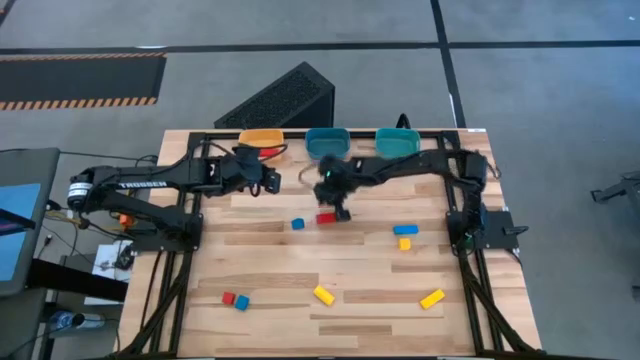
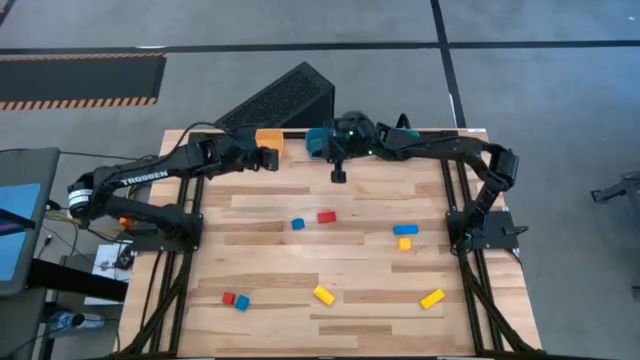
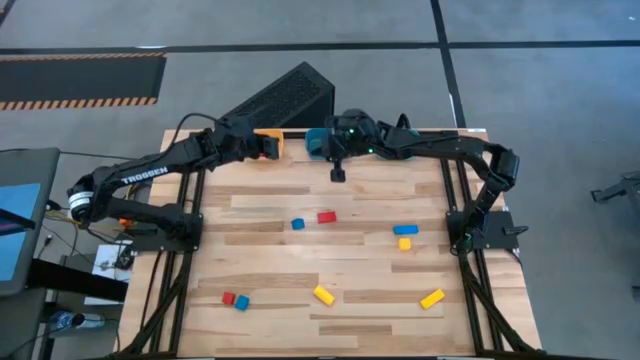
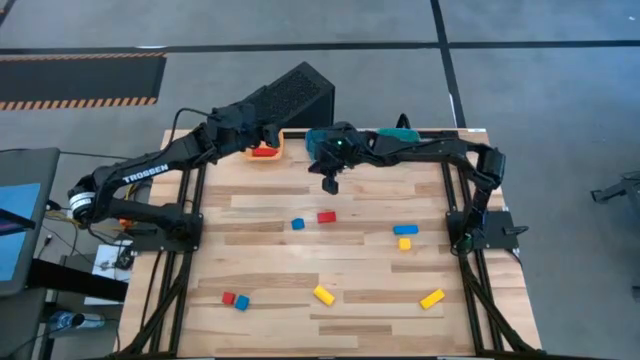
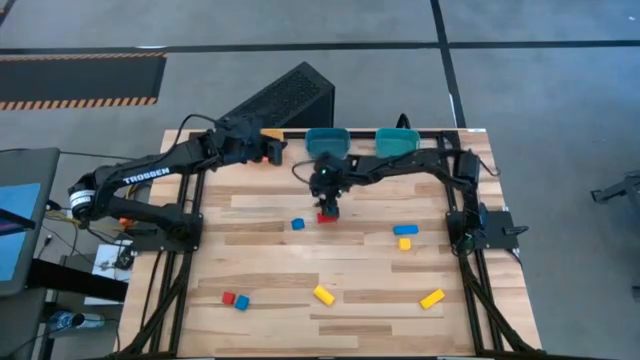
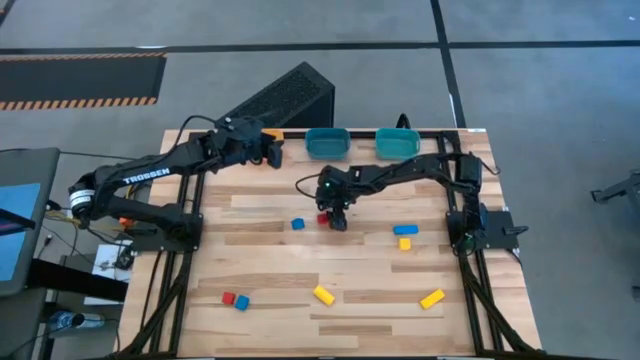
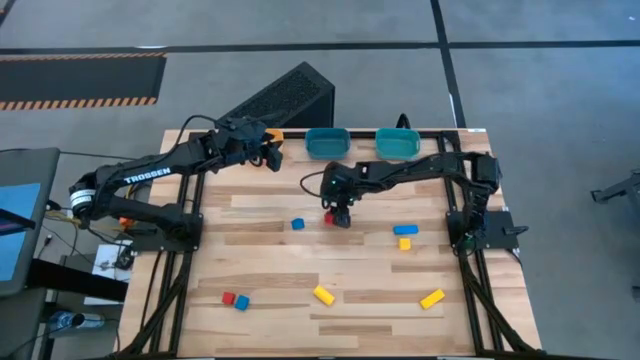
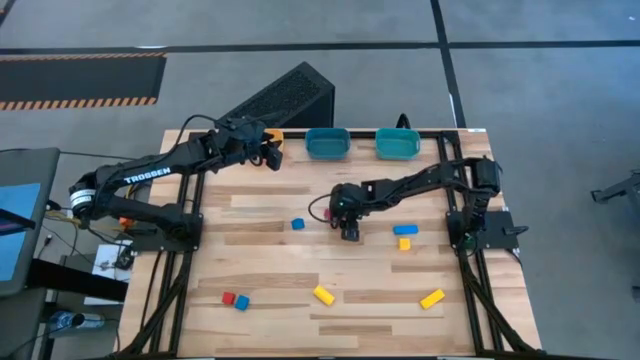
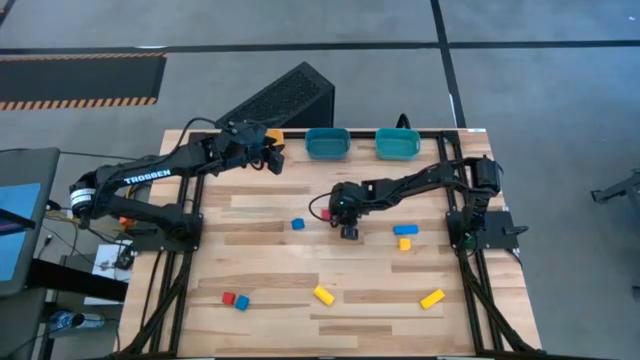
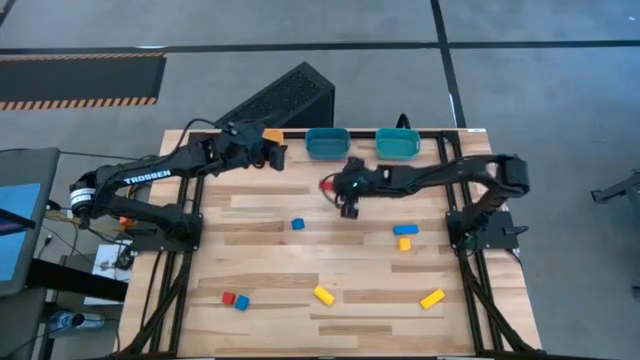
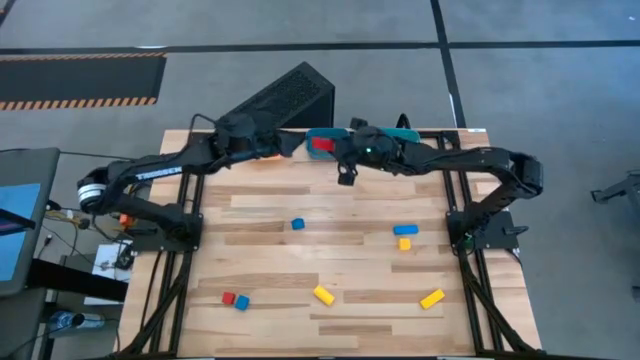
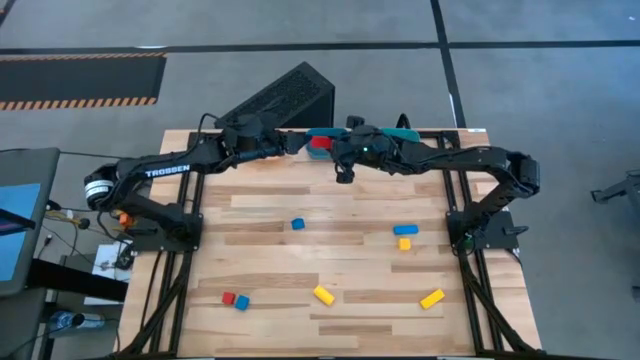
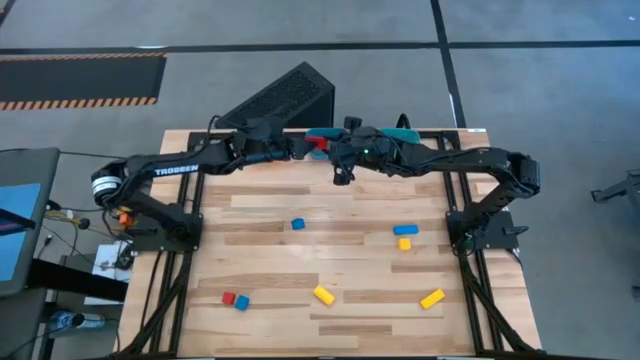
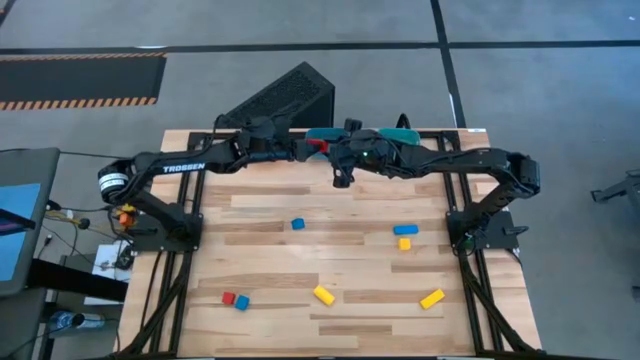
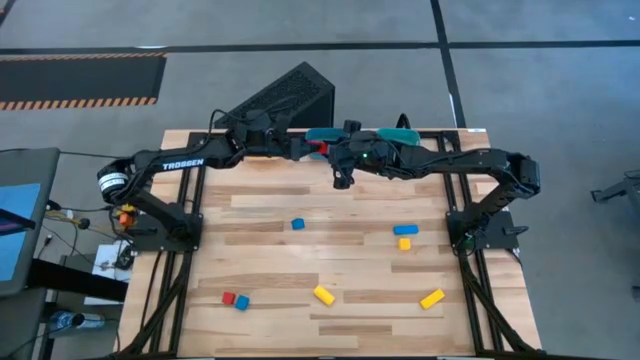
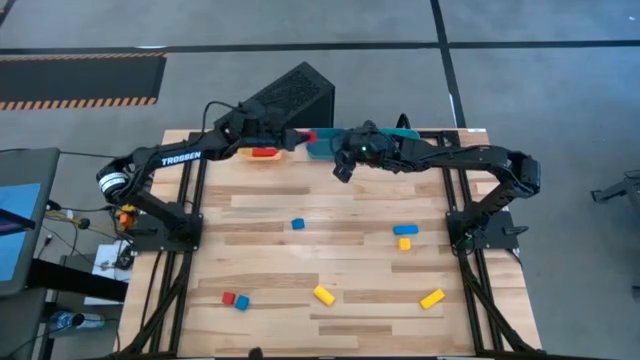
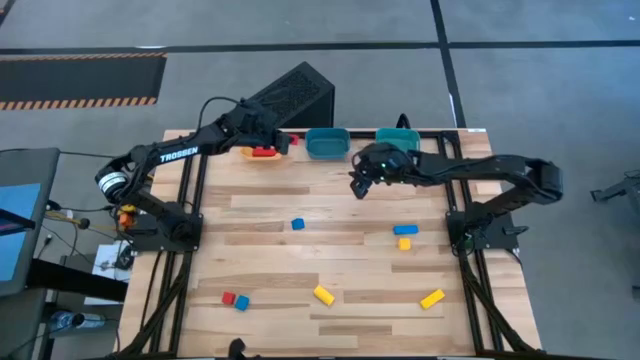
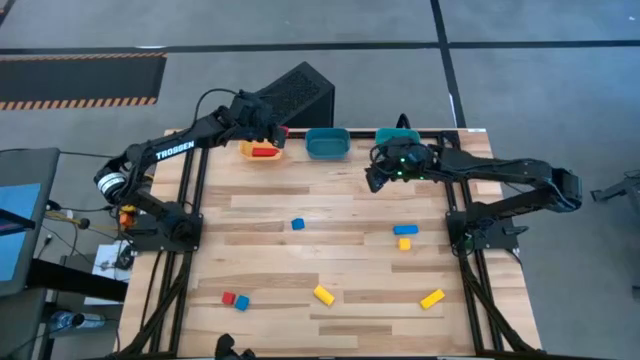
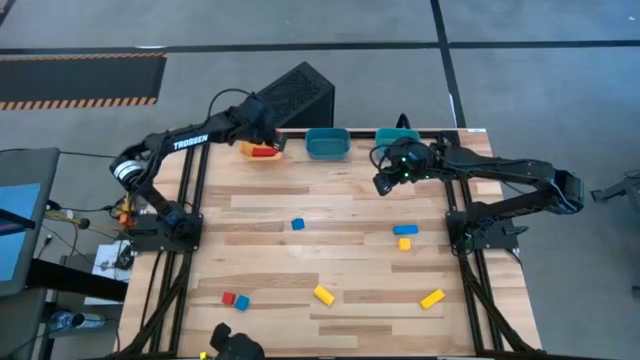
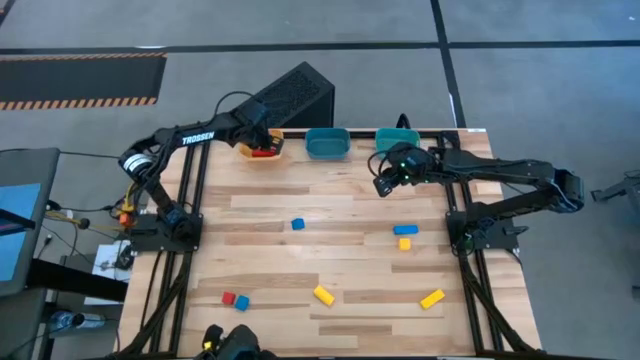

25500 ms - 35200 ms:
Task: Sort & place blocks by color
Put the right red block into the yellow container

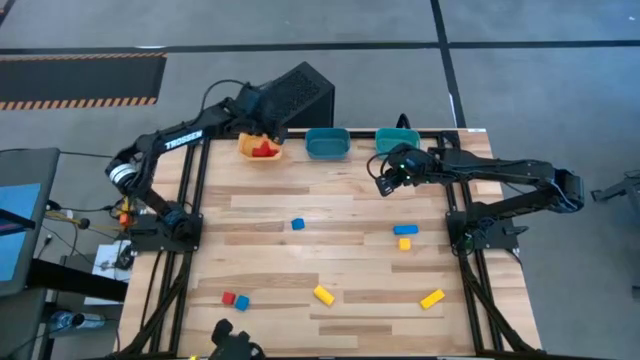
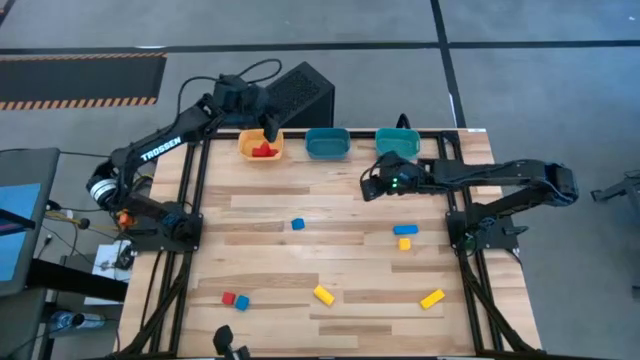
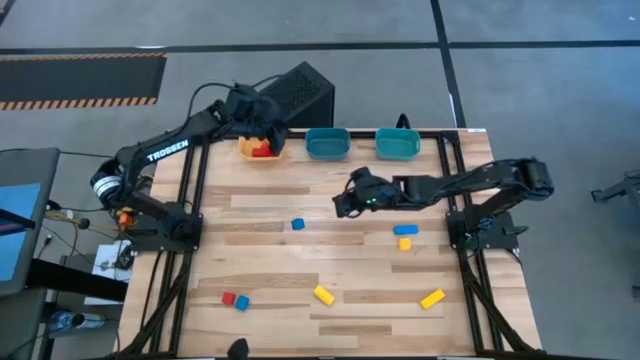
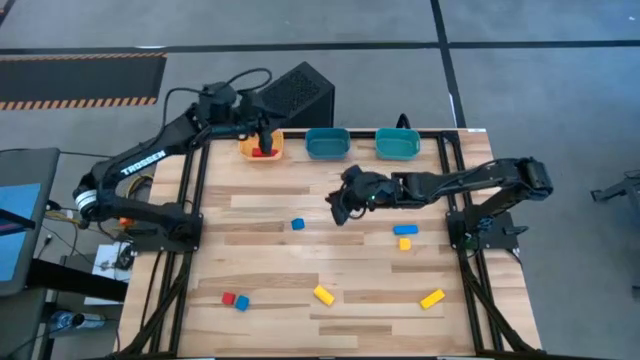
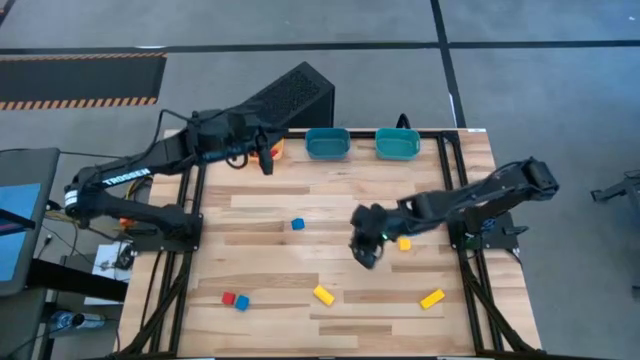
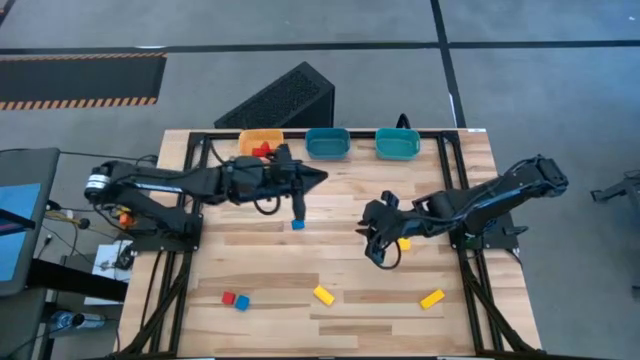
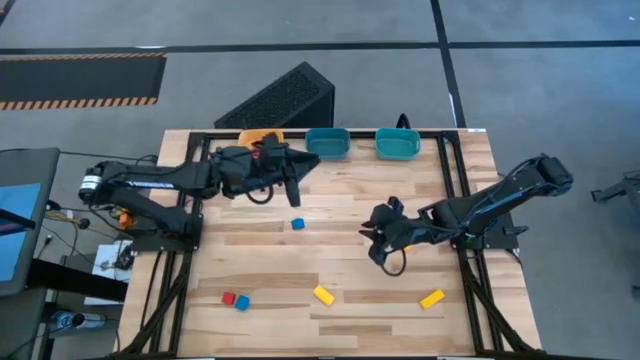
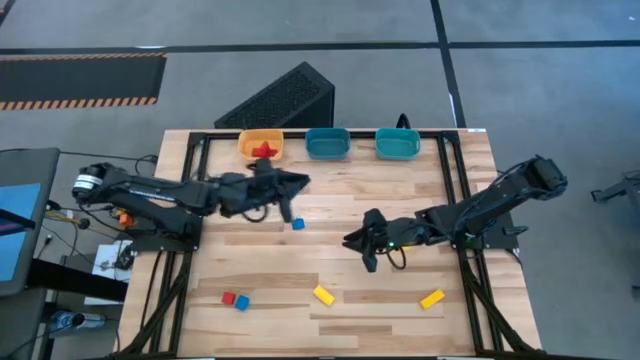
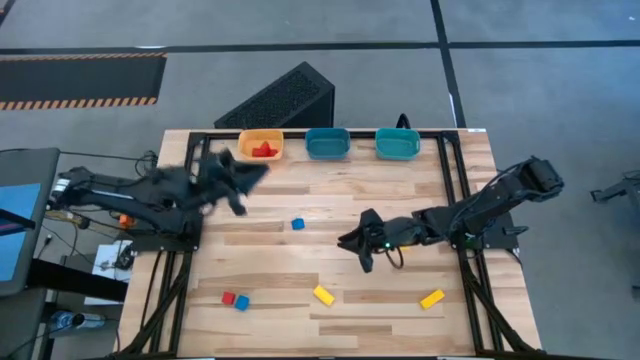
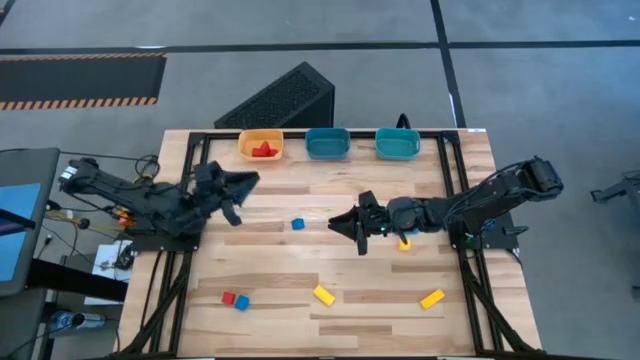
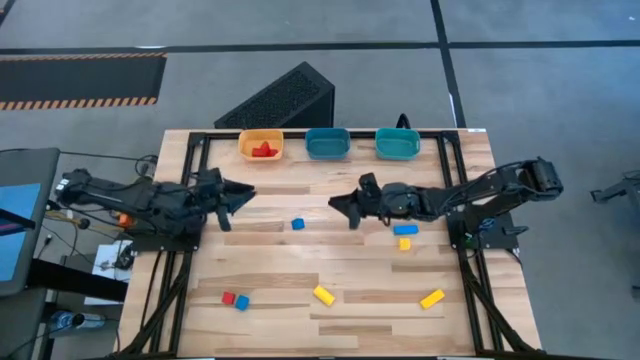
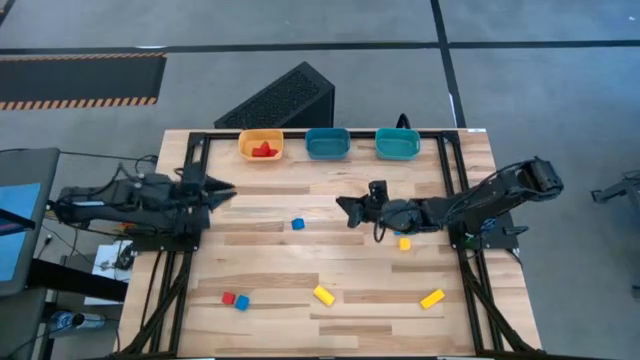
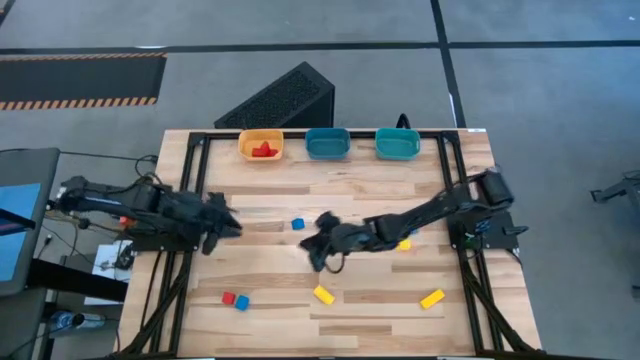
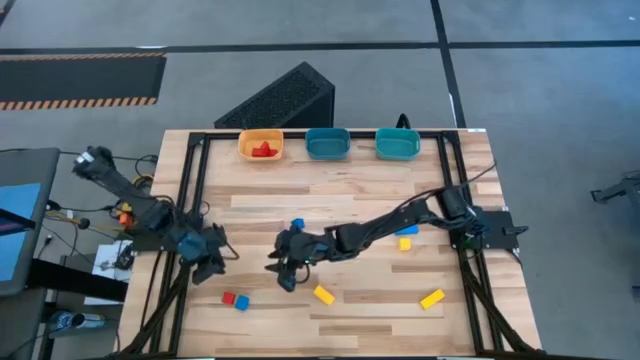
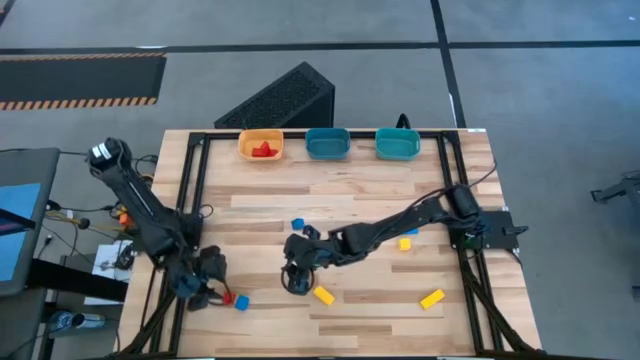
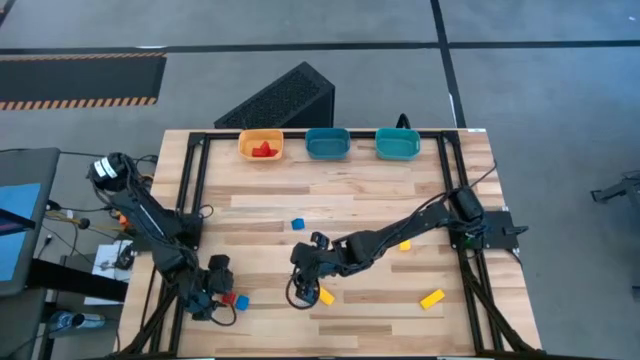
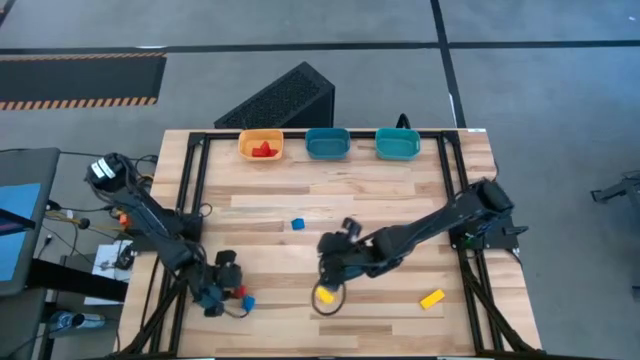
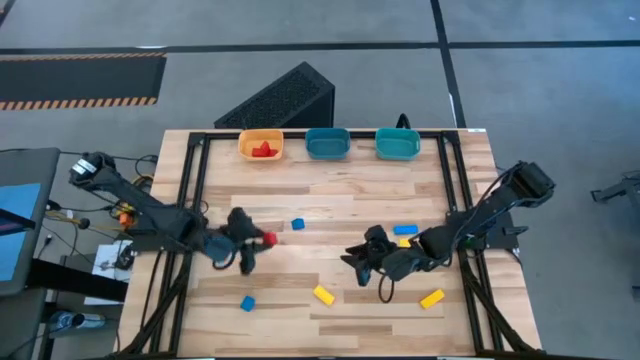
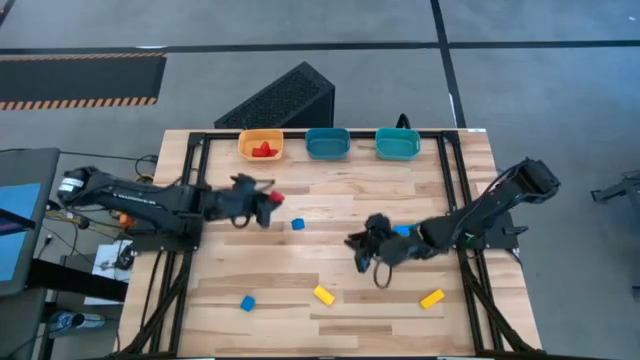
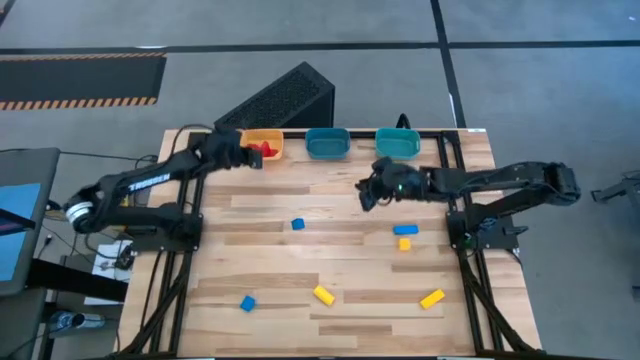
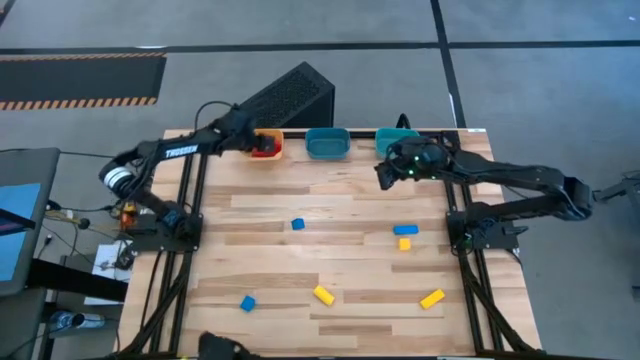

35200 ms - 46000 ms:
Put the red block into the yellow container
